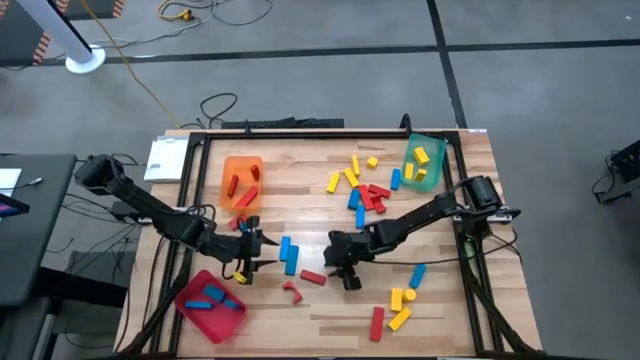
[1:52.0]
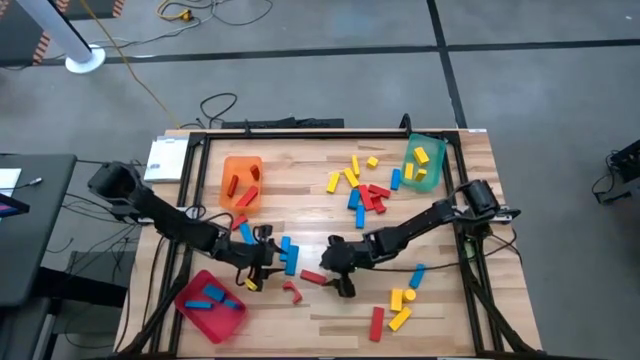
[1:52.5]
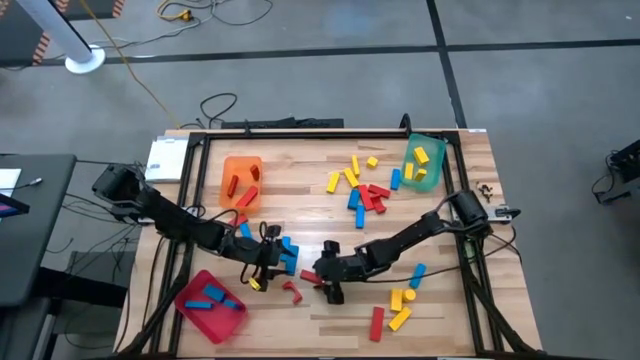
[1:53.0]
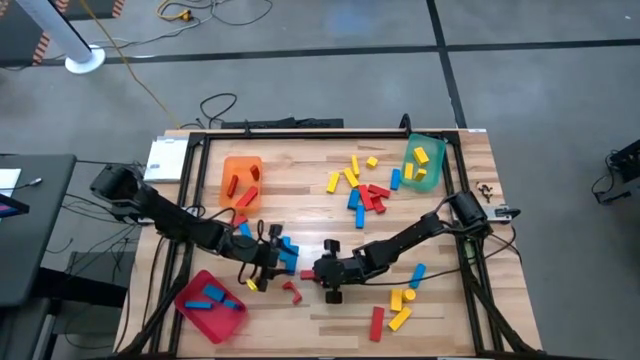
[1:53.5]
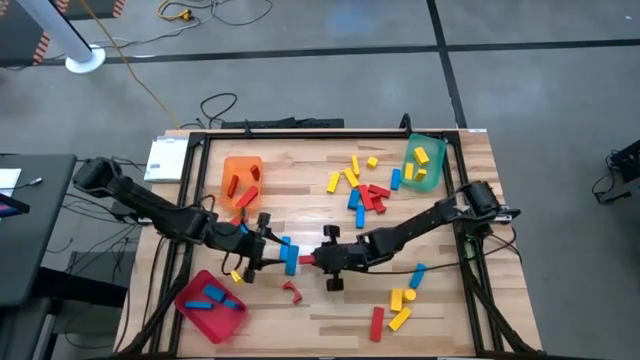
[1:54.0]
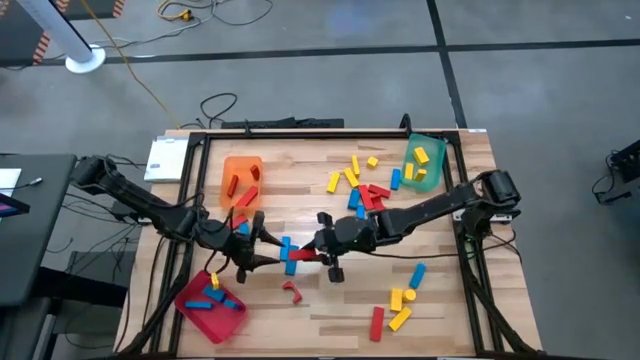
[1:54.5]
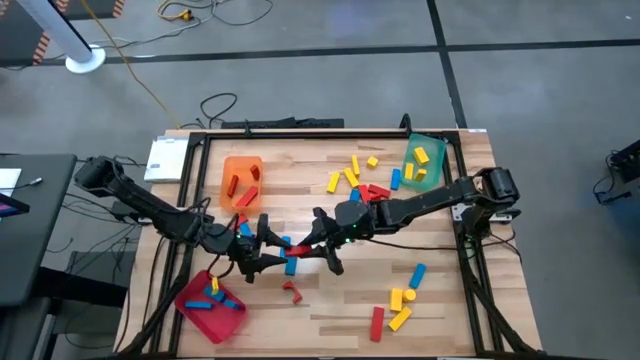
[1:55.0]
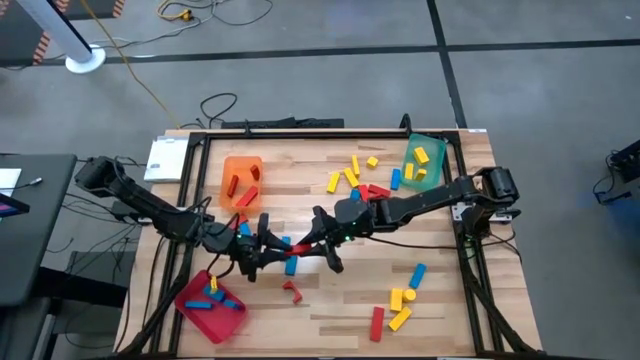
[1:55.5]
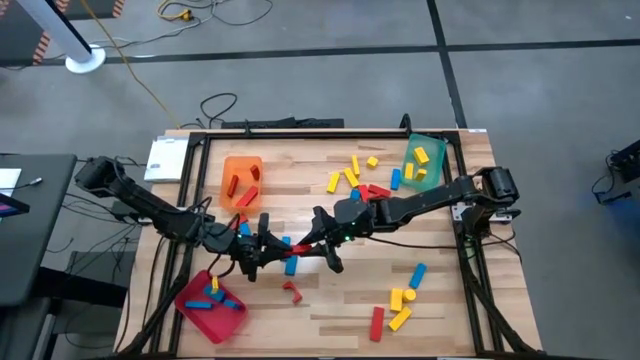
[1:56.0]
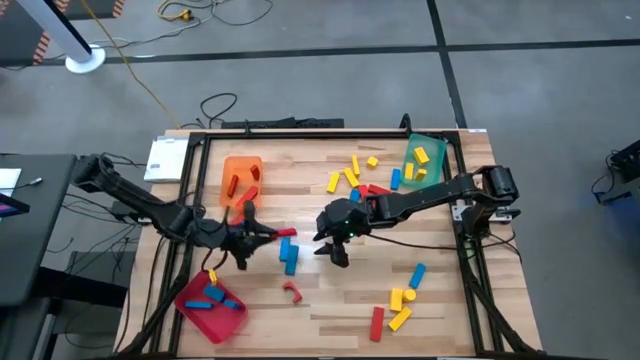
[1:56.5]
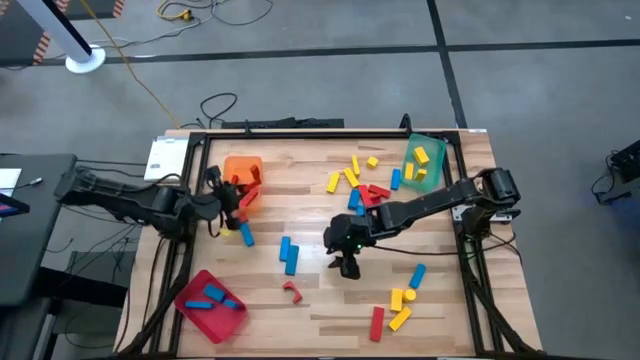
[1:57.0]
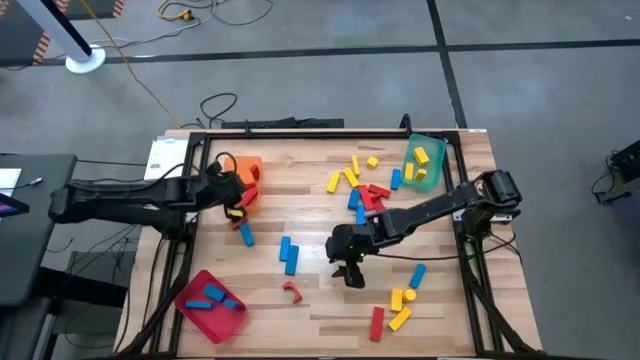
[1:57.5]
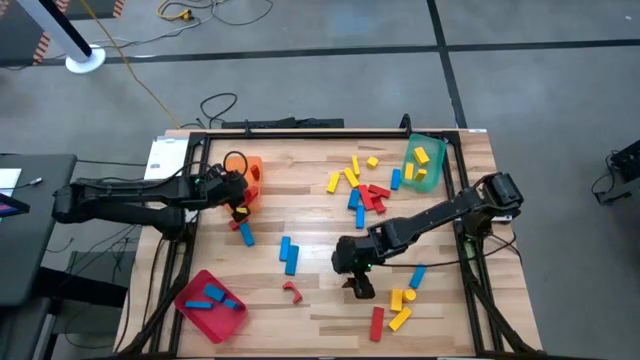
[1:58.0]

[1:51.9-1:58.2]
Task: Sort blocks
Put the red wooden block into the orange bin

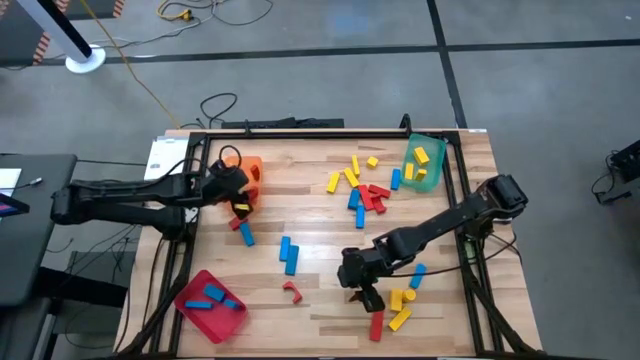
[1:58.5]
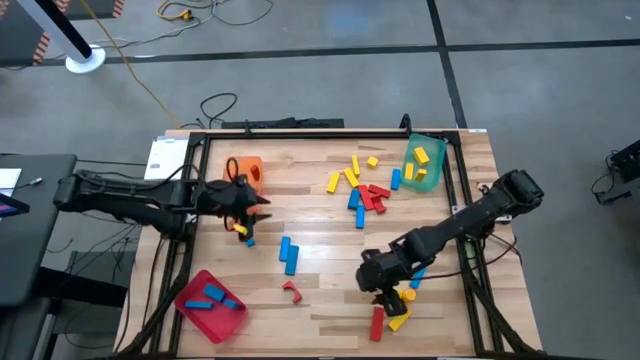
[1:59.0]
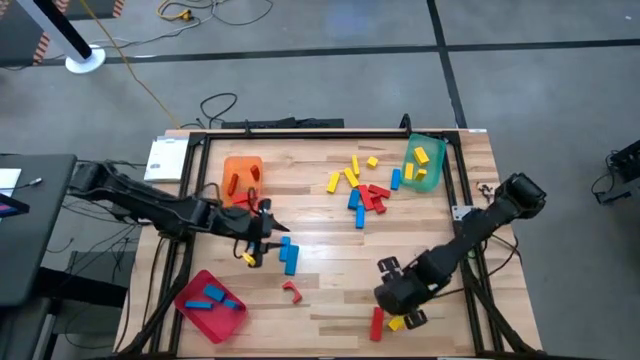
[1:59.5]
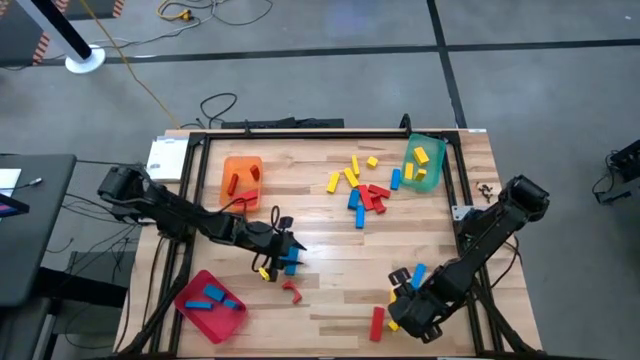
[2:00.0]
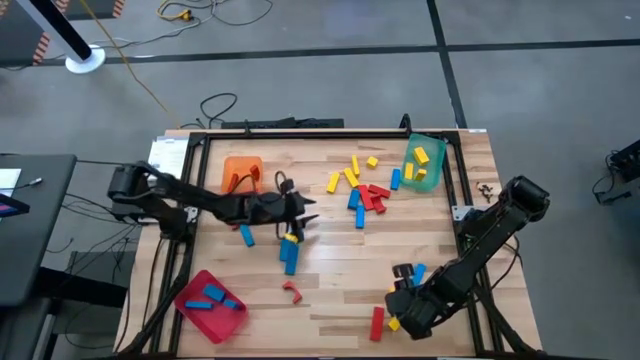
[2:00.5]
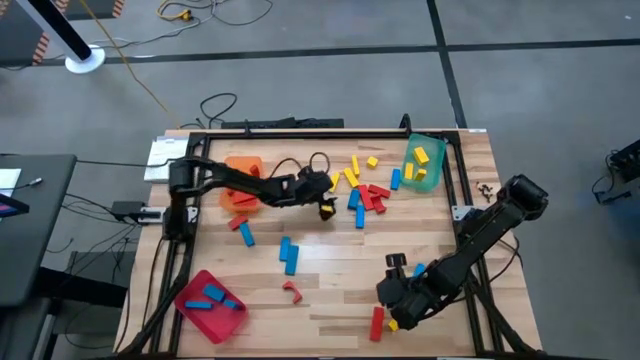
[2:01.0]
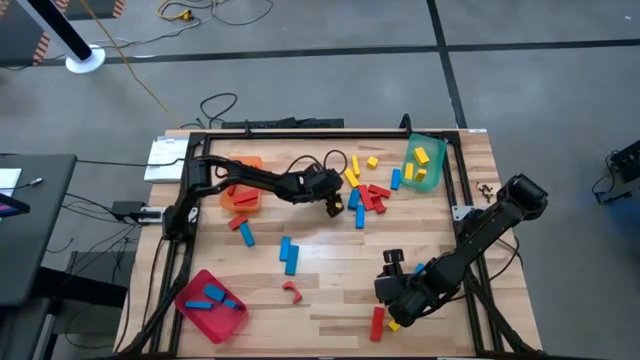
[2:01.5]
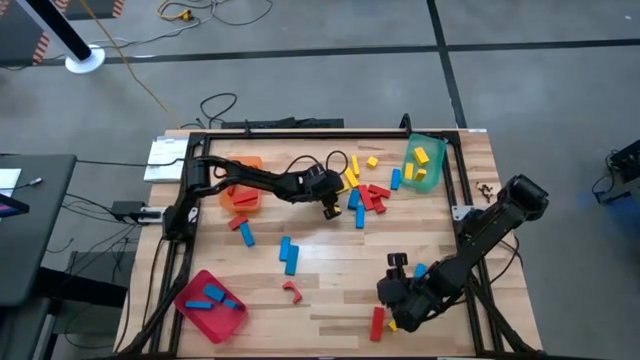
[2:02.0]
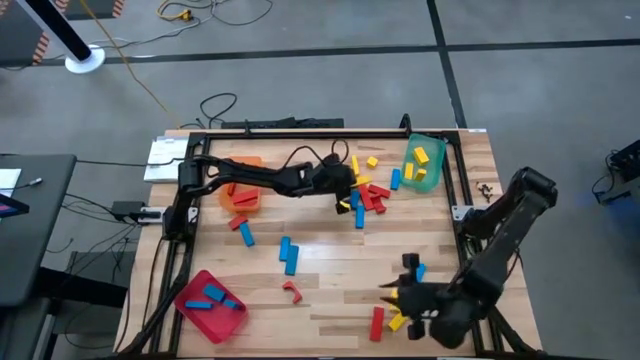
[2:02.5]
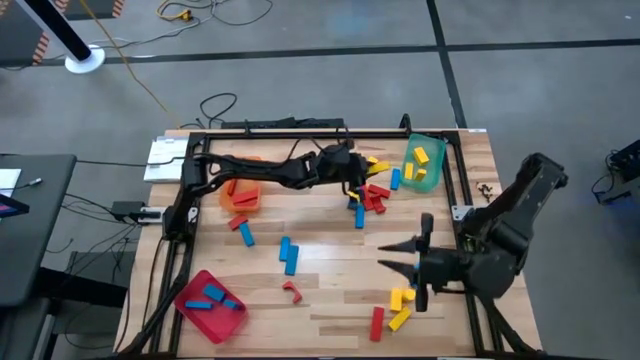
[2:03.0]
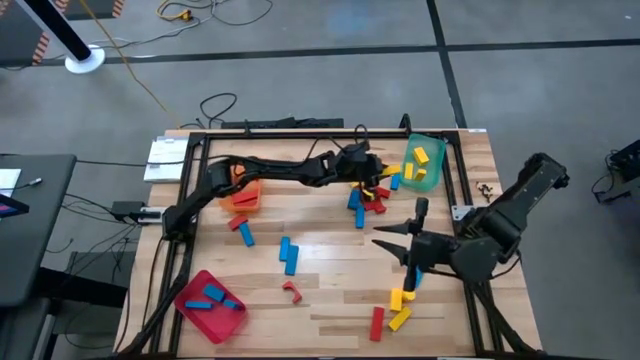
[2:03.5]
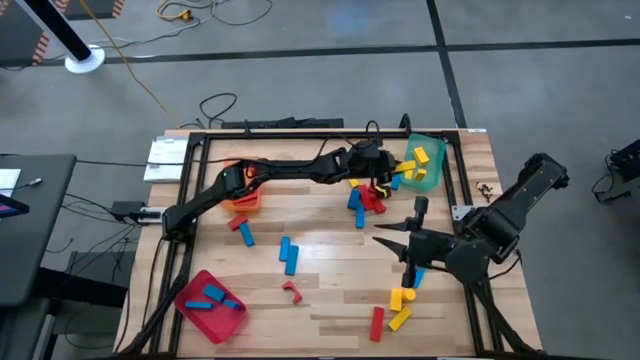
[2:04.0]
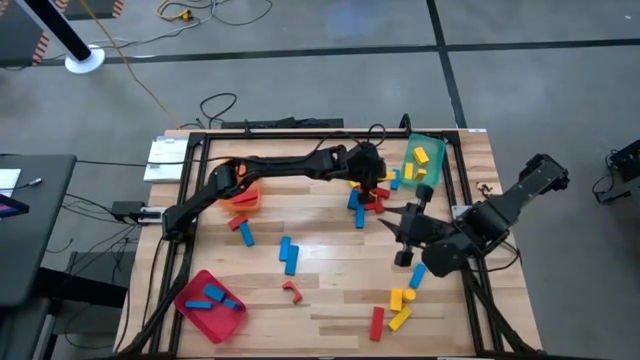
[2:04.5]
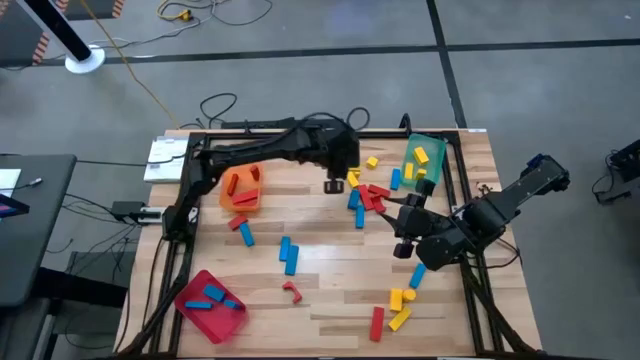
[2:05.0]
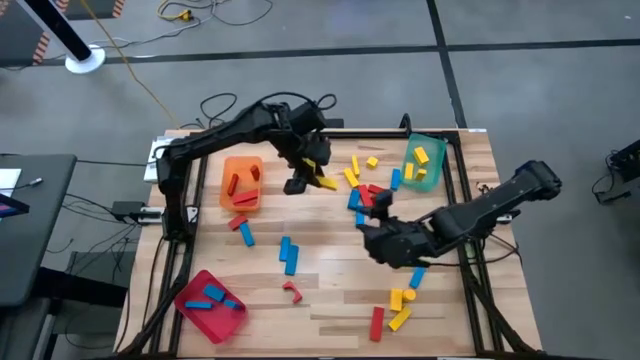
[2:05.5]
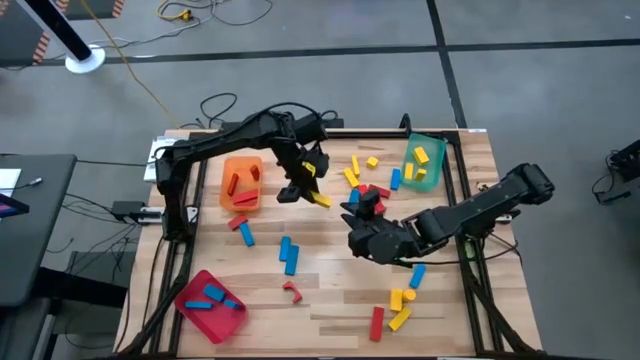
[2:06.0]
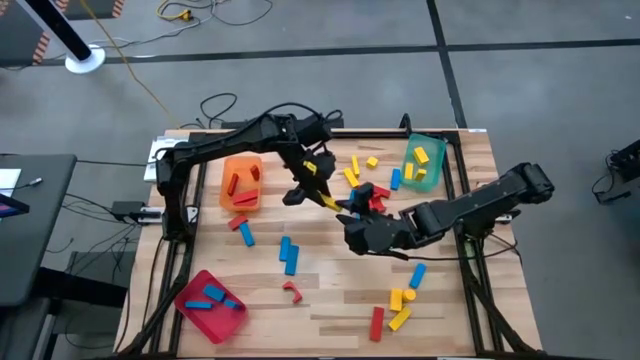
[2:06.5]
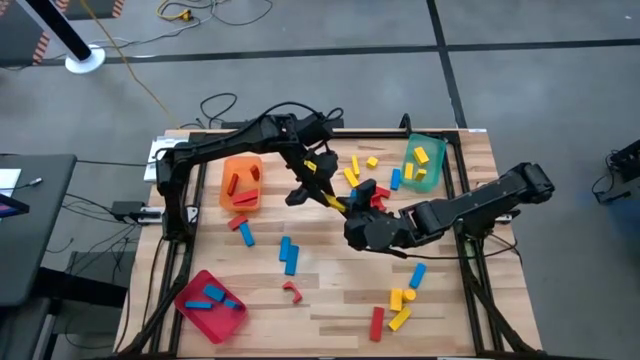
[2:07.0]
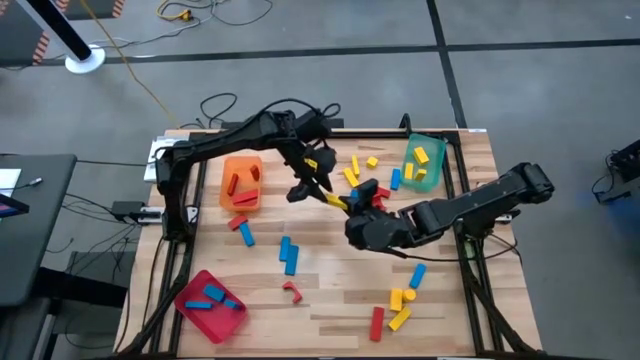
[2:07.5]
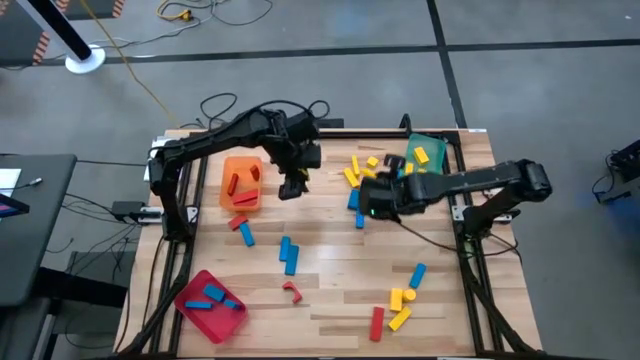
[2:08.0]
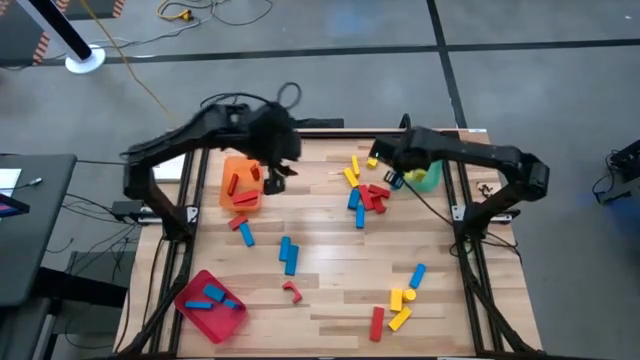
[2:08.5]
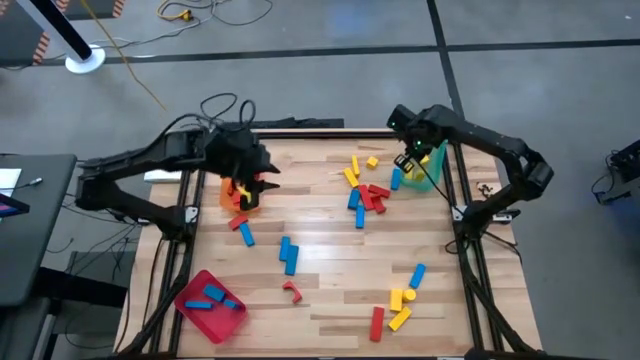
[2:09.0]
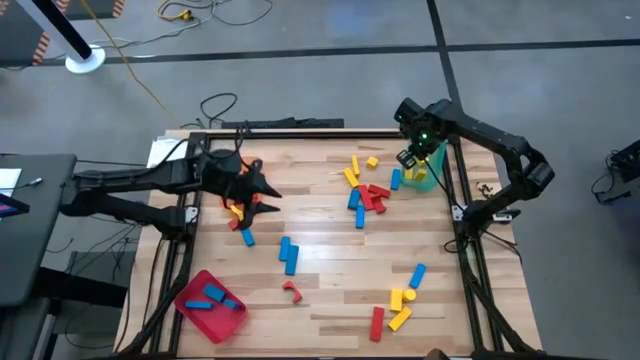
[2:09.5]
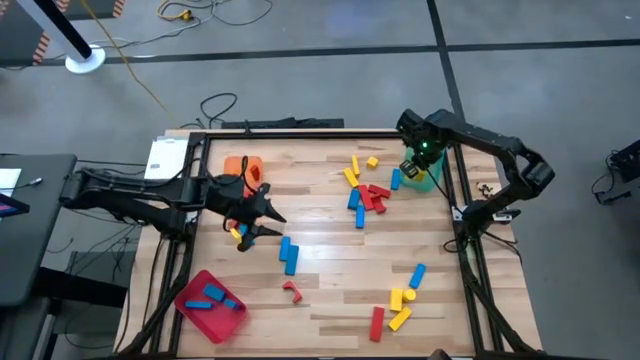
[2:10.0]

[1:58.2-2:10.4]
Put the yellow wooden block into the green bin
